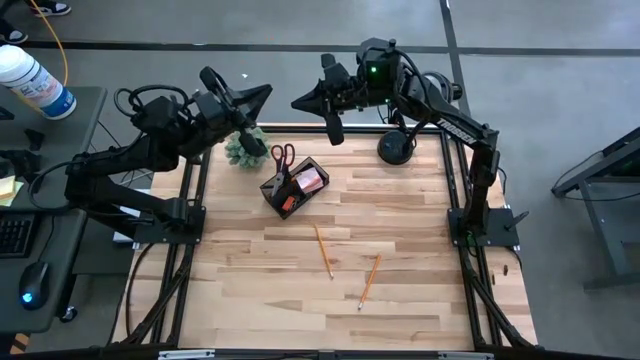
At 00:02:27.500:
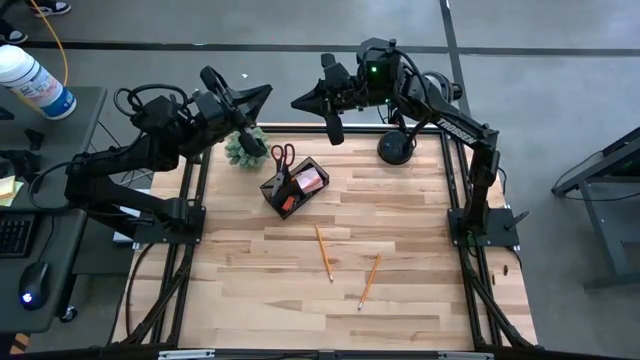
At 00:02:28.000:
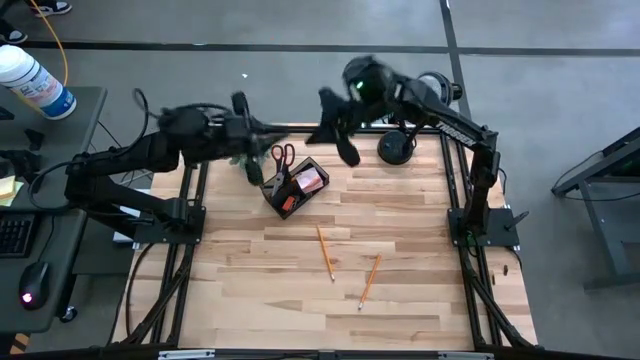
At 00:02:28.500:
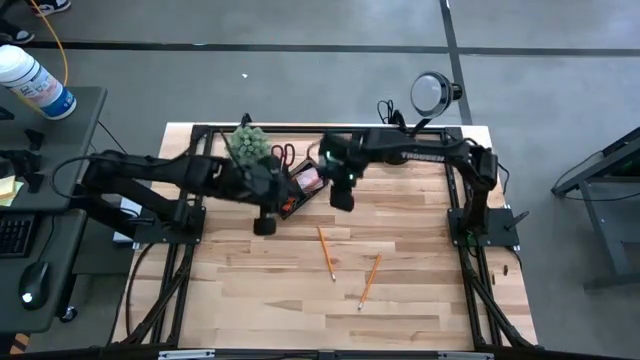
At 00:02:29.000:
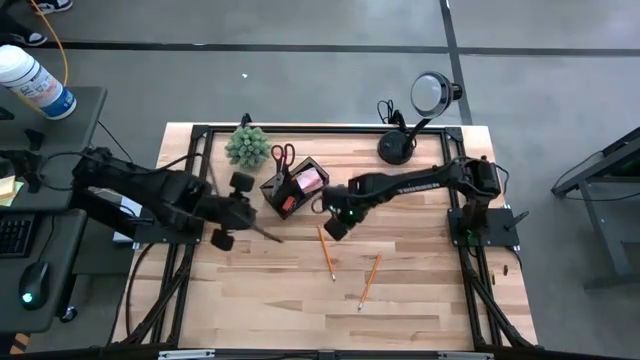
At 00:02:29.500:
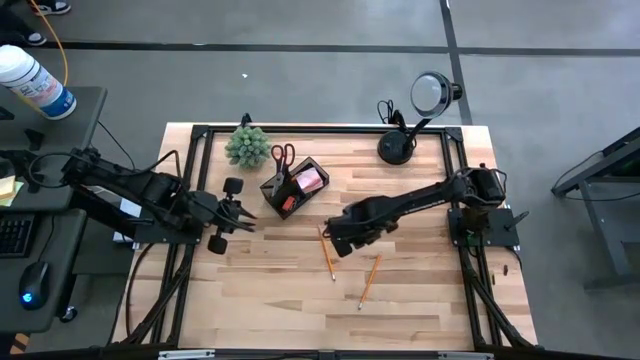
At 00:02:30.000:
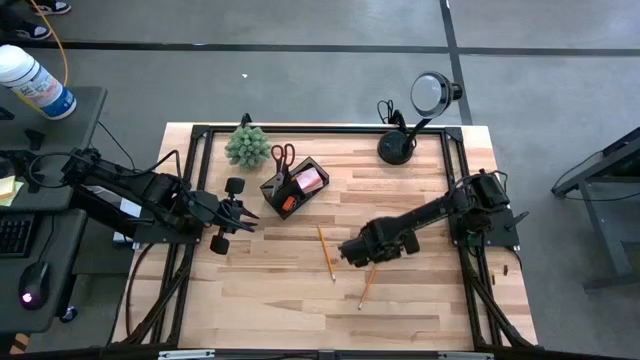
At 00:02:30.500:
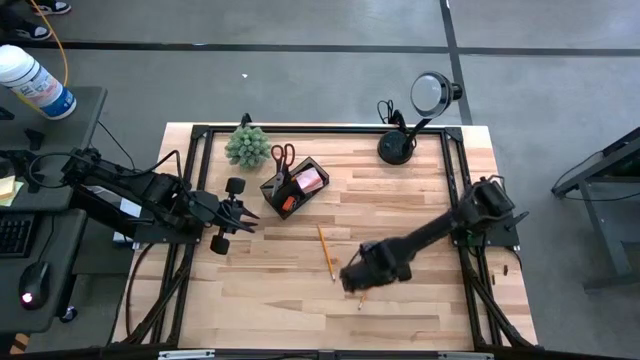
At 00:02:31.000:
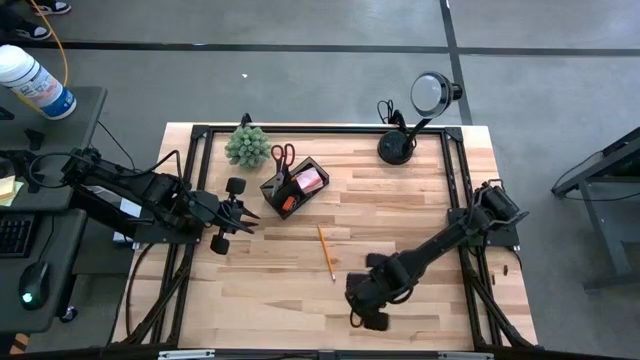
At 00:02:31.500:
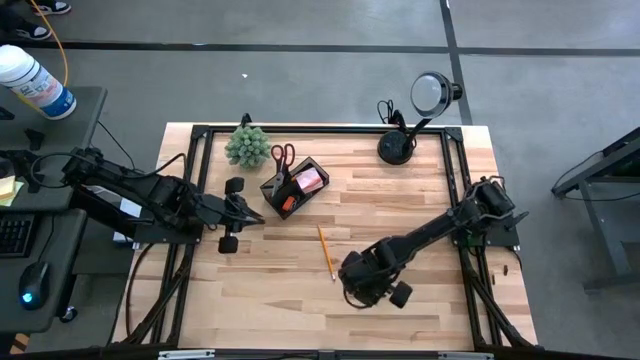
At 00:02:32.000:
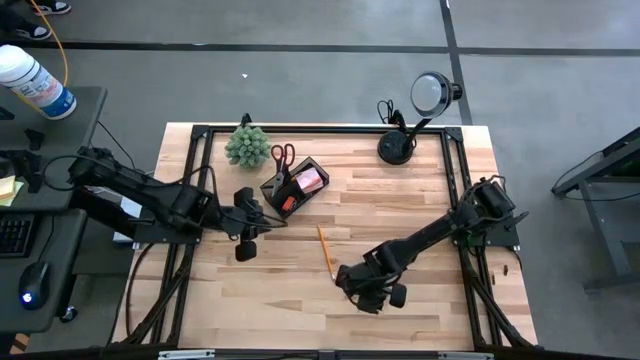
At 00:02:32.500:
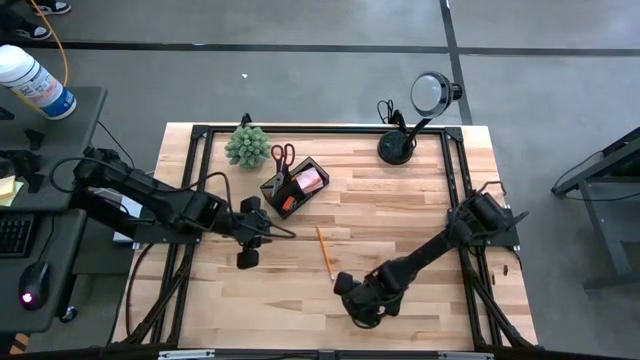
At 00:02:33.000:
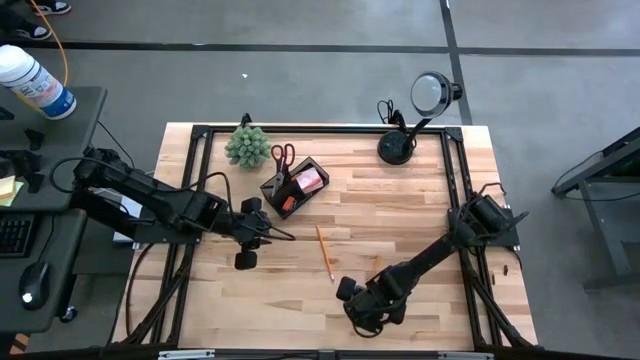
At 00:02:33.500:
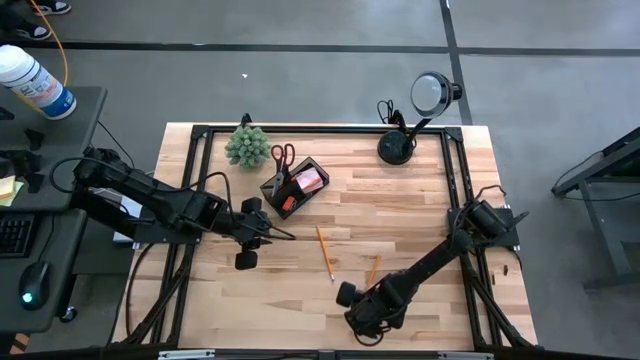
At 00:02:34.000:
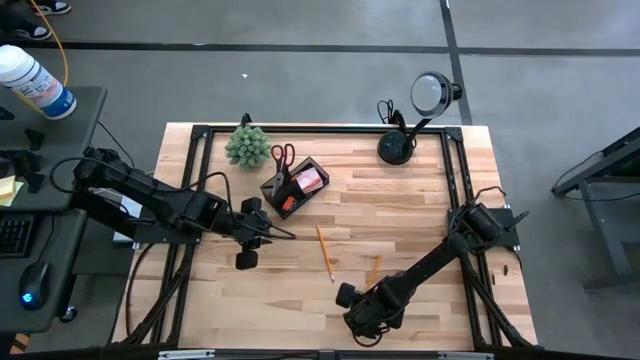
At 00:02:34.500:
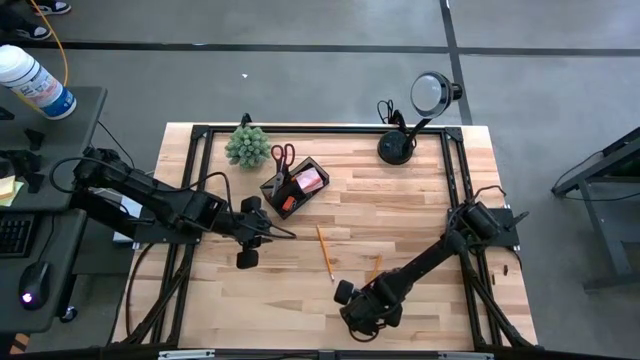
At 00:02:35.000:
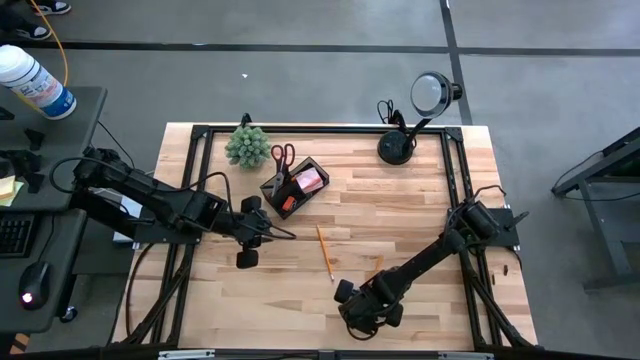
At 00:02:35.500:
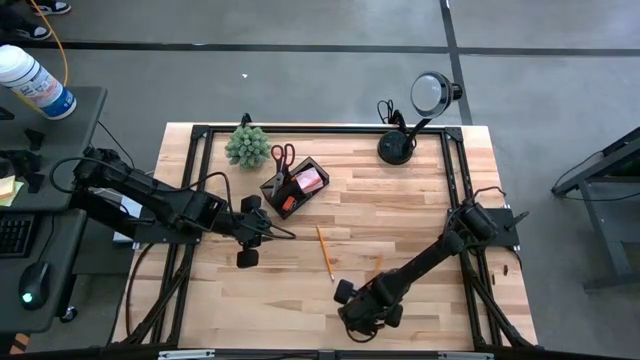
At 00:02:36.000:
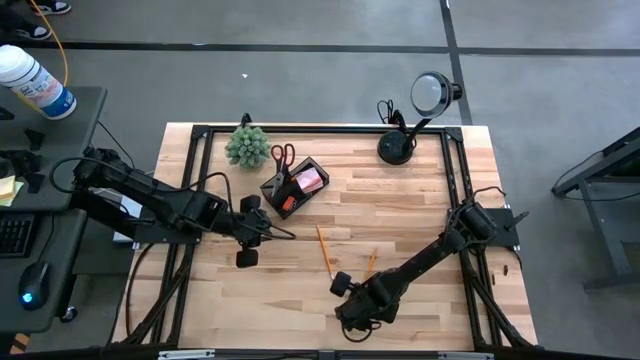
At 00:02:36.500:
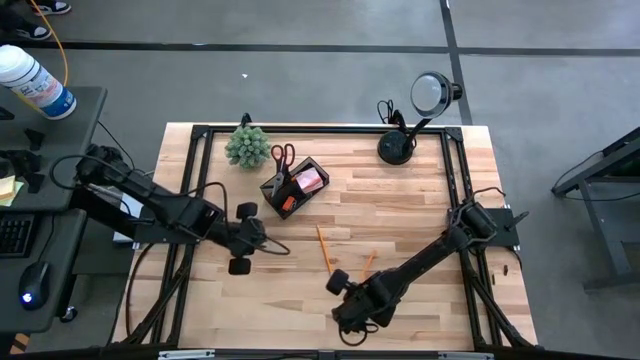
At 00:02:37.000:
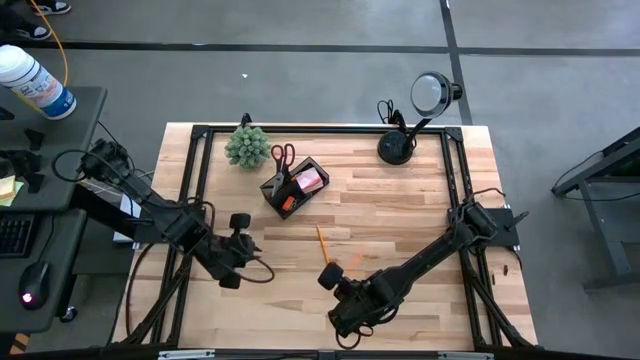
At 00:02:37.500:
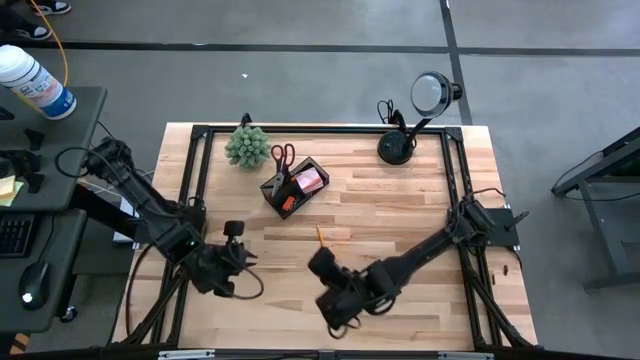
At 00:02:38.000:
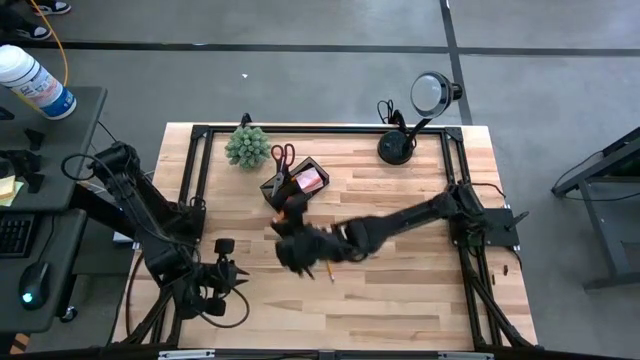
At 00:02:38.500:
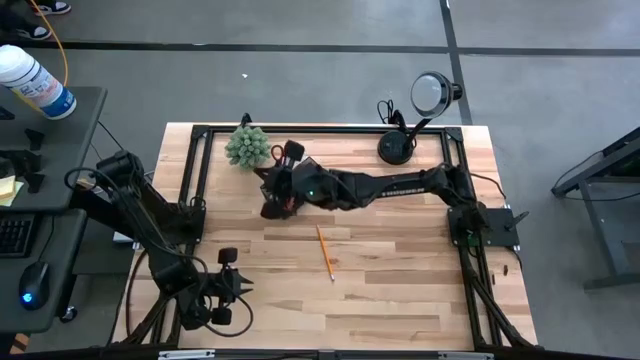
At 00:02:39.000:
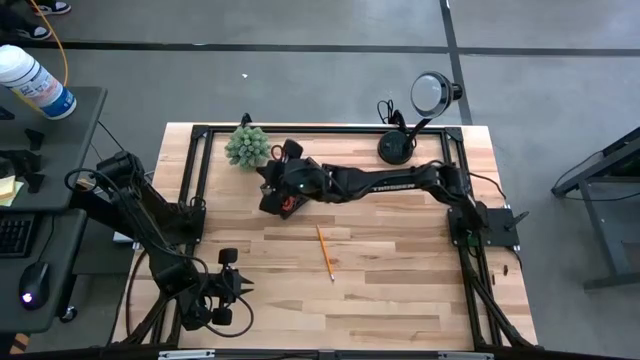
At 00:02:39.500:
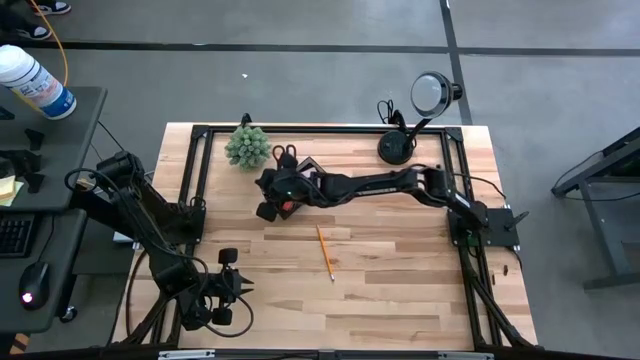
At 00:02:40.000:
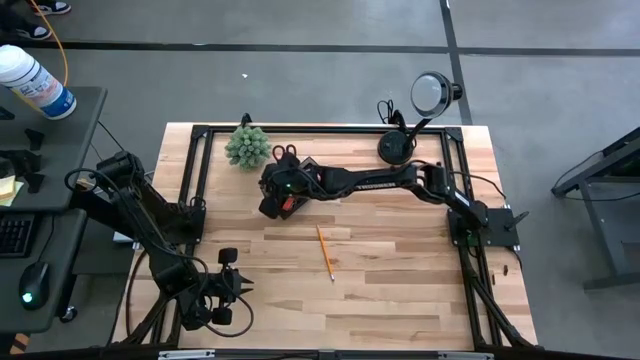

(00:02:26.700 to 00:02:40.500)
Task: Pick and place office supplies into organizer
Put the right orange pencil into the black desk organizer

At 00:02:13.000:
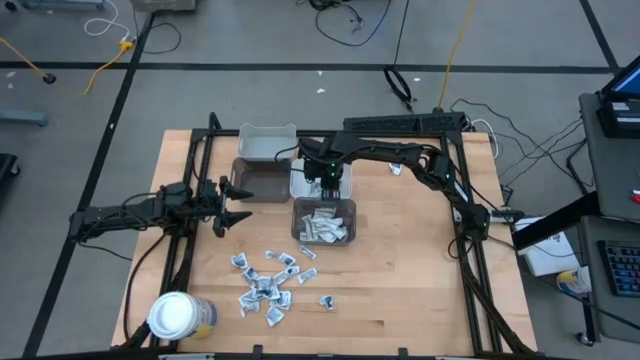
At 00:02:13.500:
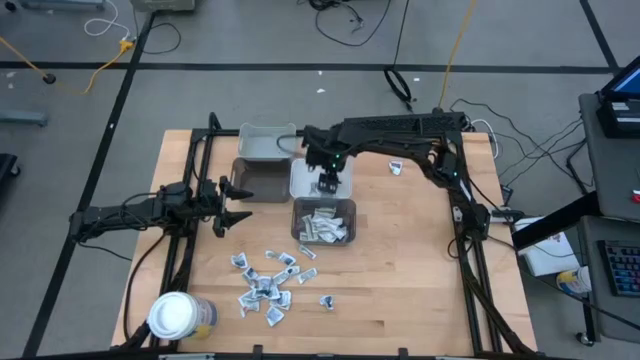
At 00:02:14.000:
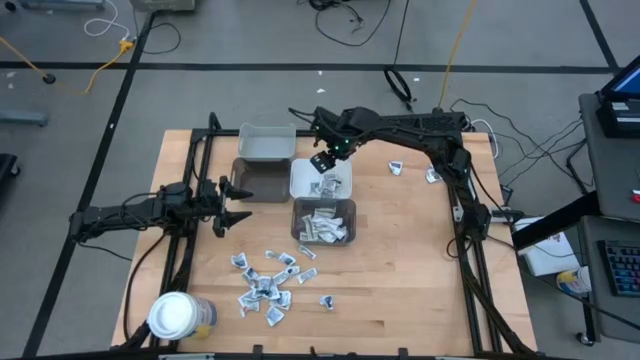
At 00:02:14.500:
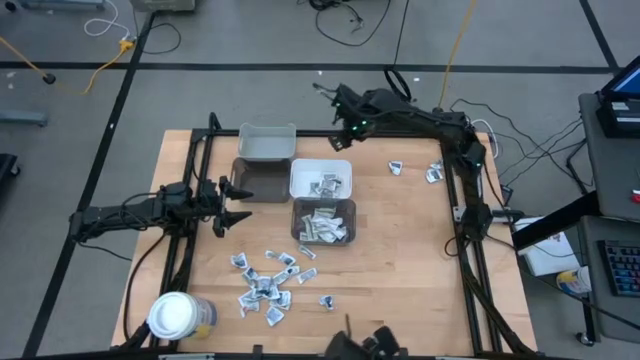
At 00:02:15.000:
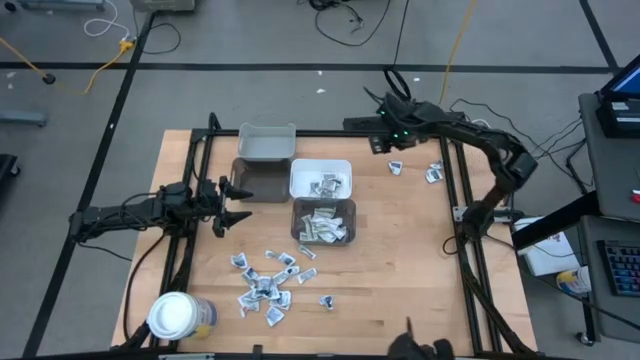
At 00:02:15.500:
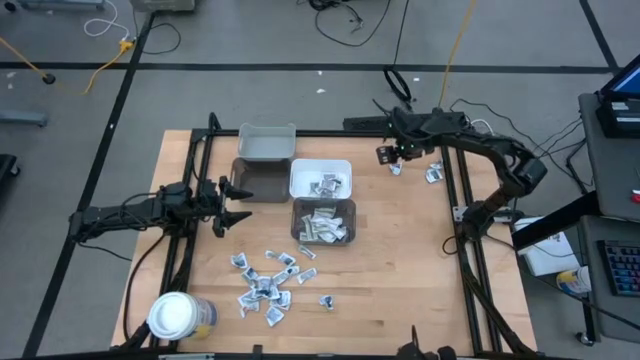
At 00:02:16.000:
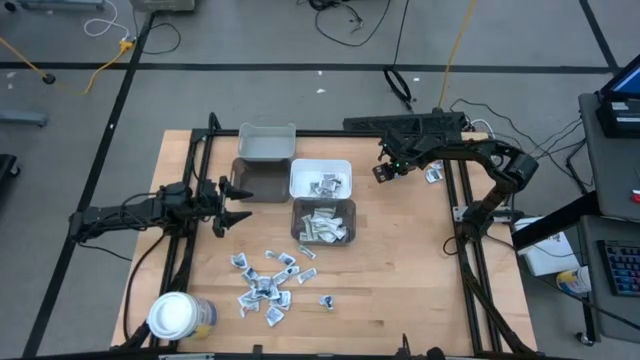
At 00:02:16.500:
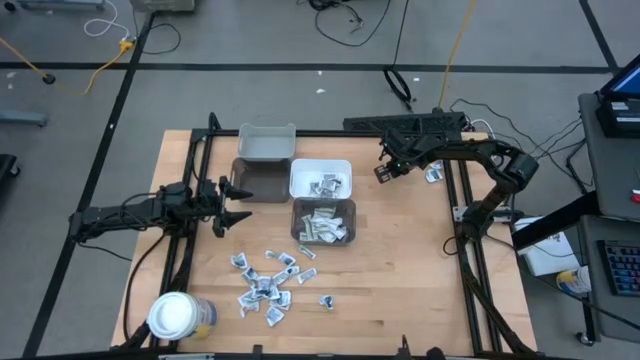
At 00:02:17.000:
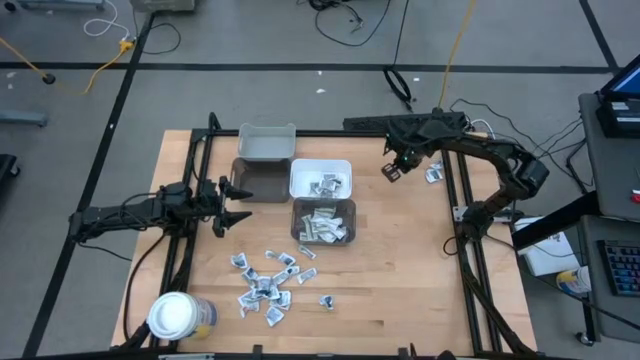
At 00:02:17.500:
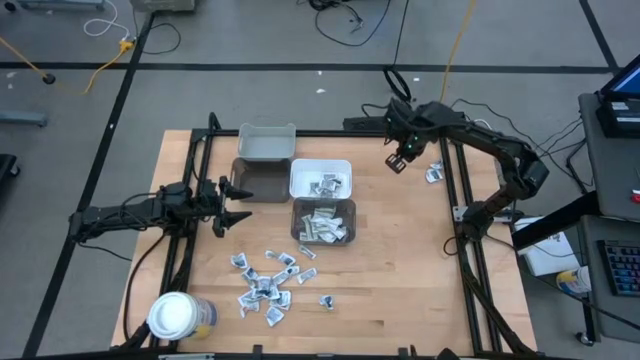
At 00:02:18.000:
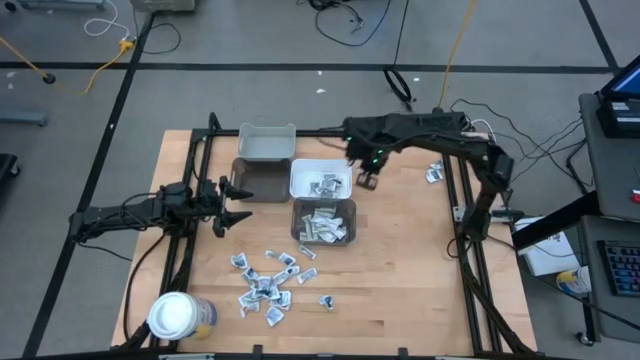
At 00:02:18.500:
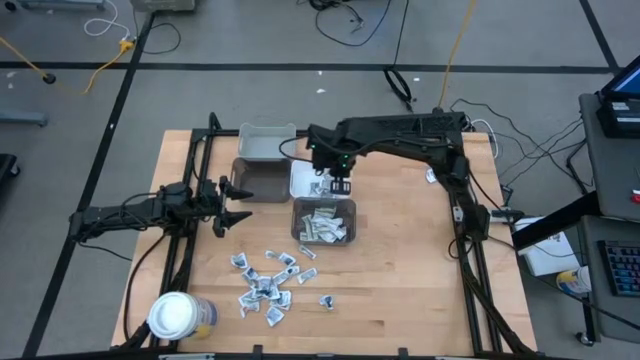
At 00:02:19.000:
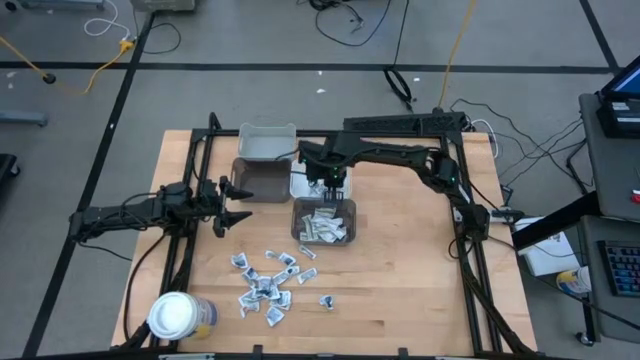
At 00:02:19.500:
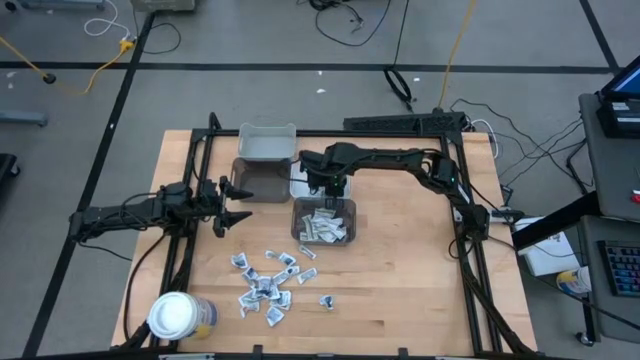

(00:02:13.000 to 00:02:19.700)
Task: Pick & Place First Aid Supplies
Put the gray towelette pack into the white bin
